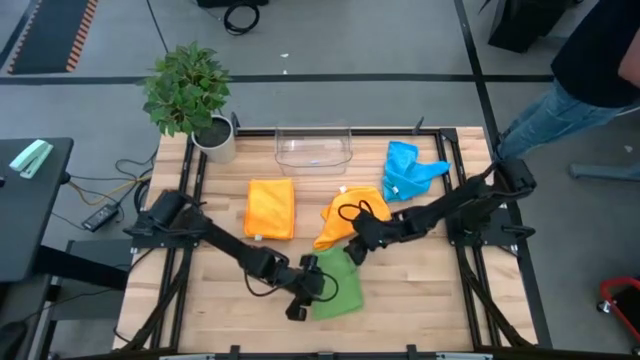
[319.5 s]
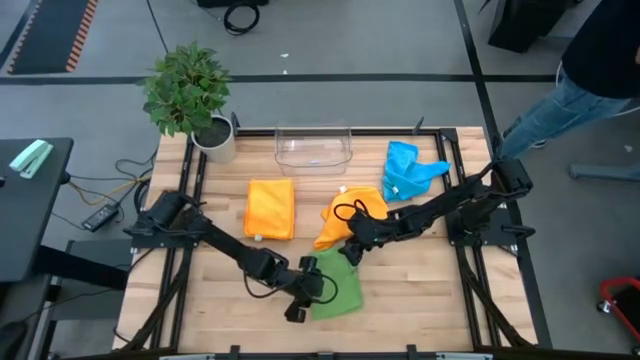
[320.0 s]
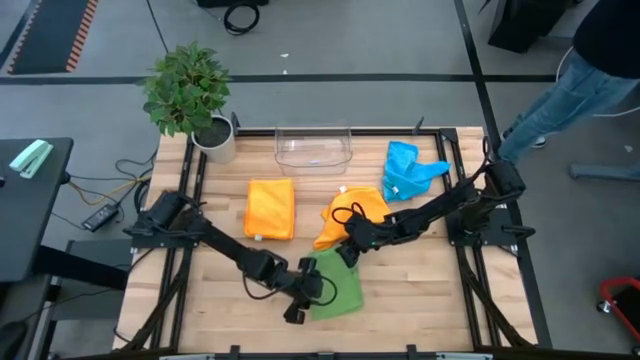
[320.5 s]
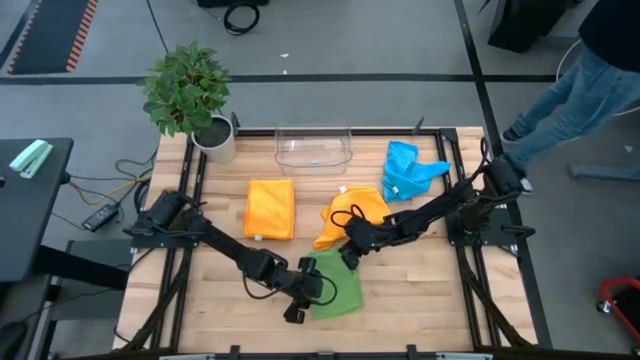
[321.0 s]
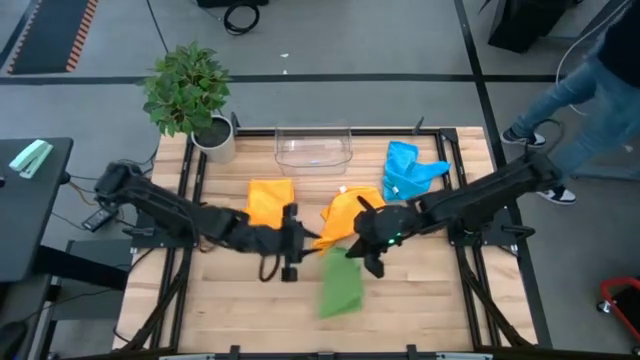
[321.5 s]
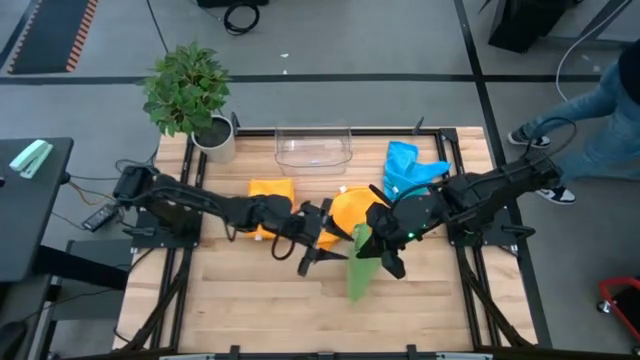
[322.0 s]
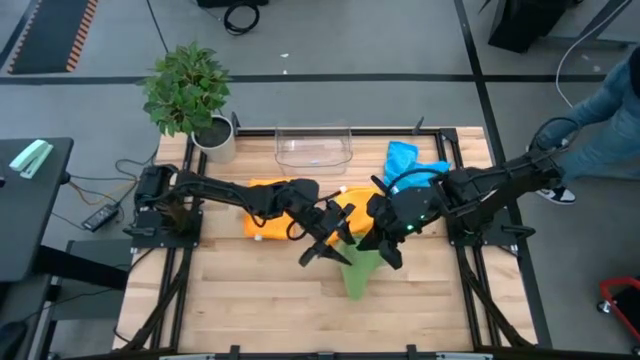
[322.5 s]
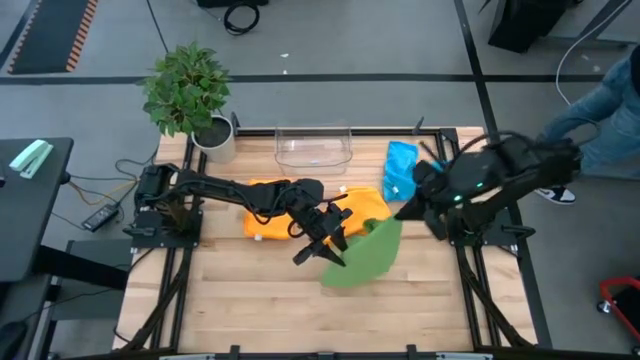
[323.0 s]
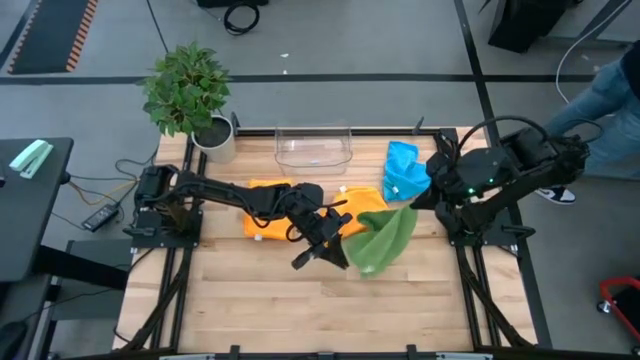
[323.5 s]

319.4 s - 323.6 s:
Task: Fold microfiber towels
Fold the green microfiber cloth

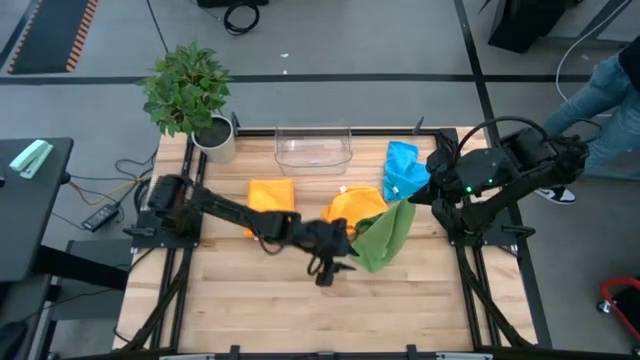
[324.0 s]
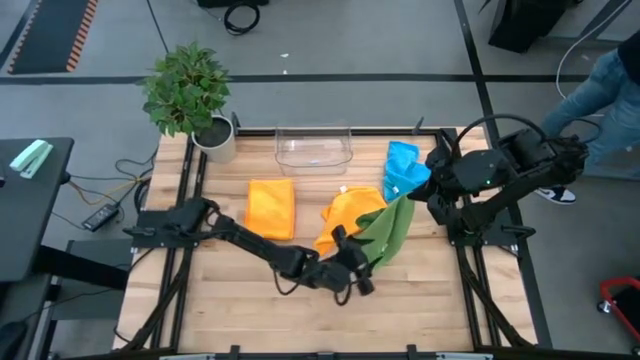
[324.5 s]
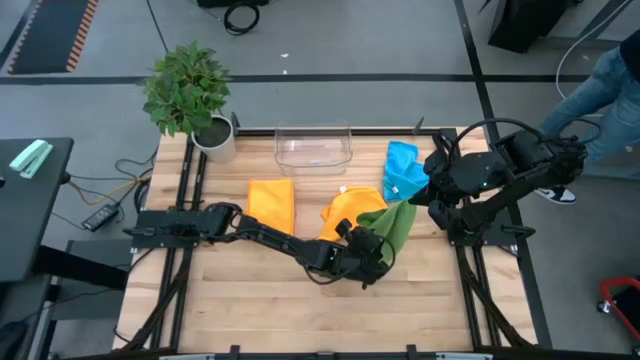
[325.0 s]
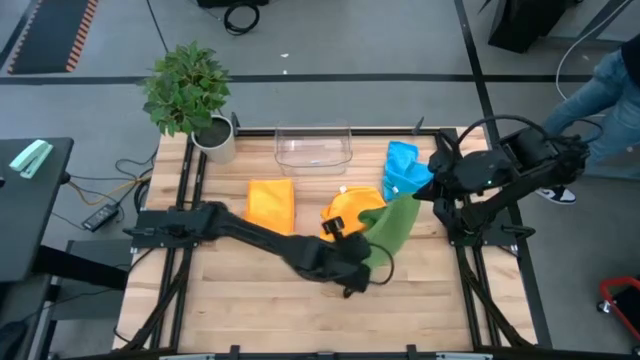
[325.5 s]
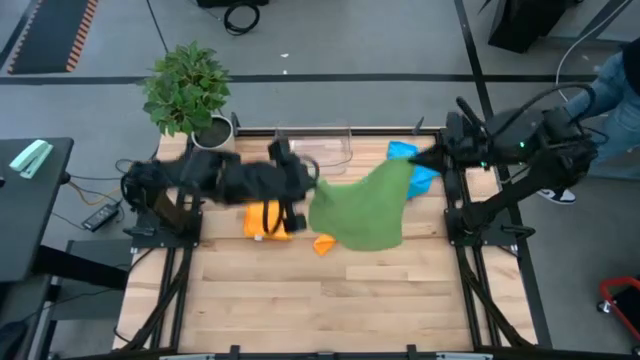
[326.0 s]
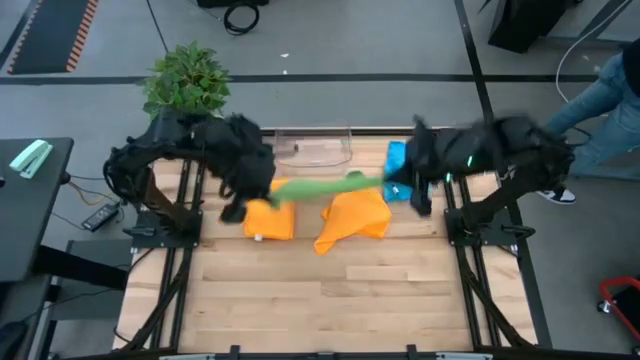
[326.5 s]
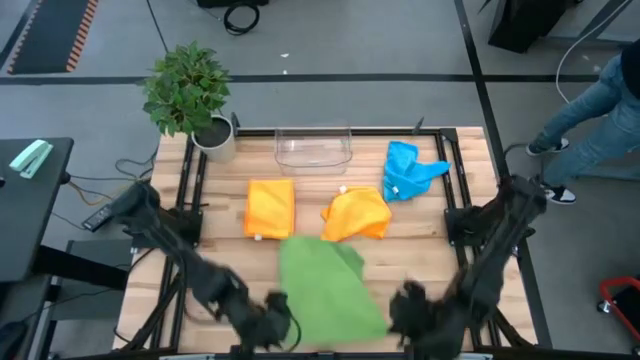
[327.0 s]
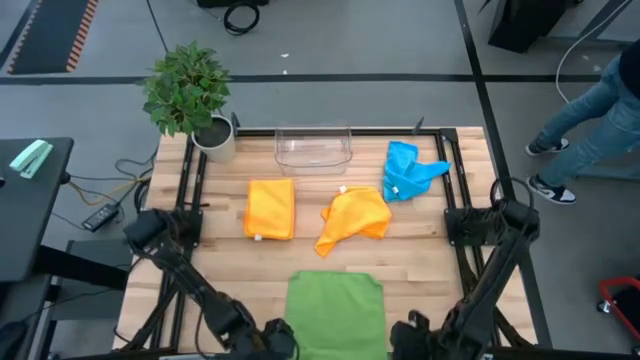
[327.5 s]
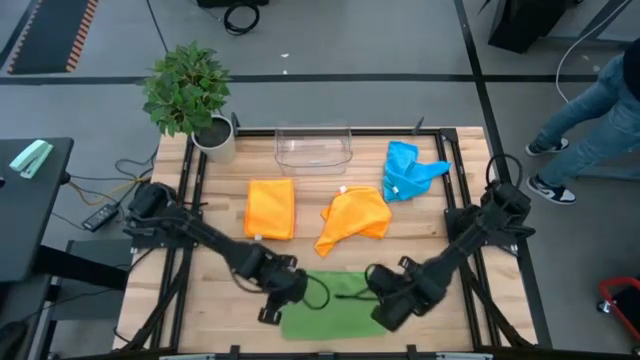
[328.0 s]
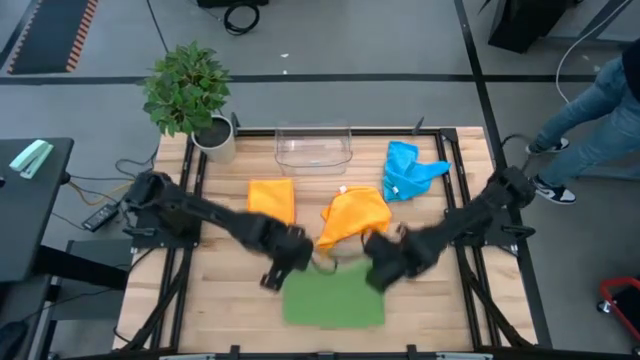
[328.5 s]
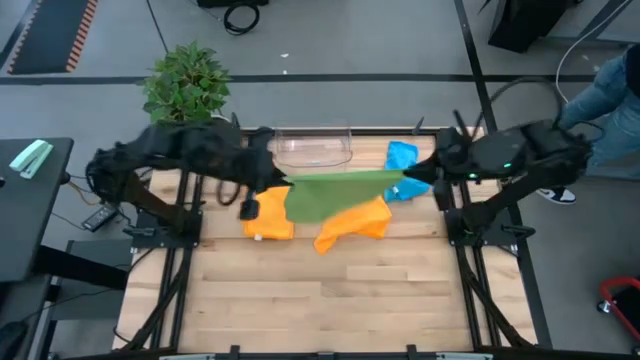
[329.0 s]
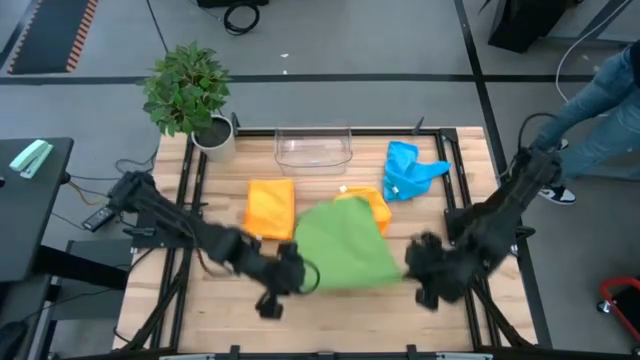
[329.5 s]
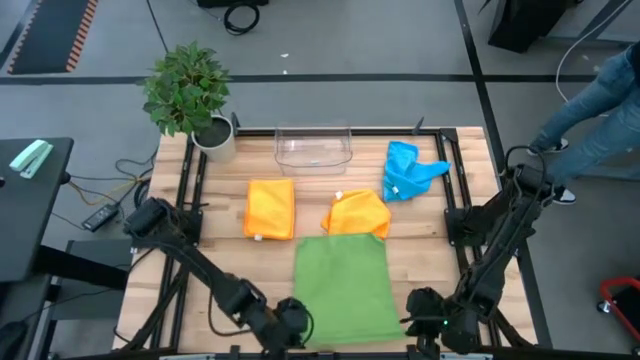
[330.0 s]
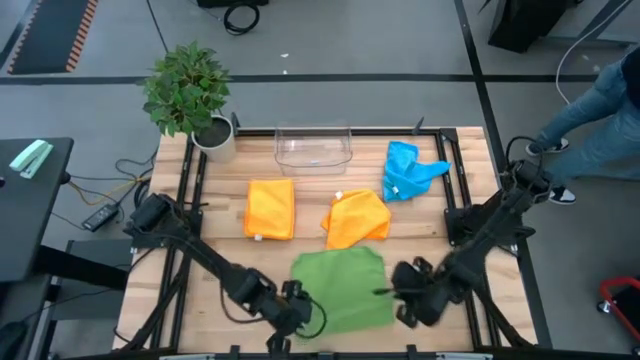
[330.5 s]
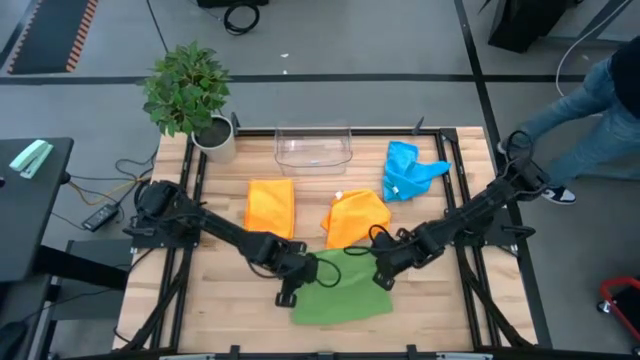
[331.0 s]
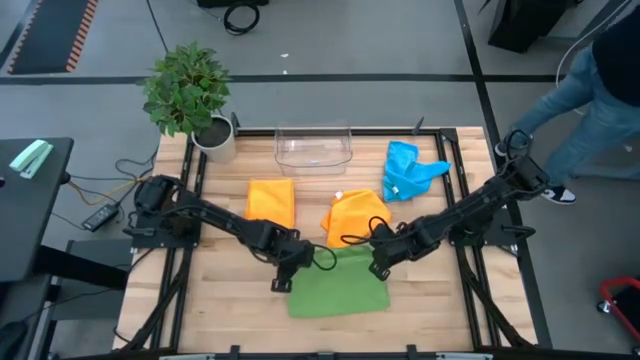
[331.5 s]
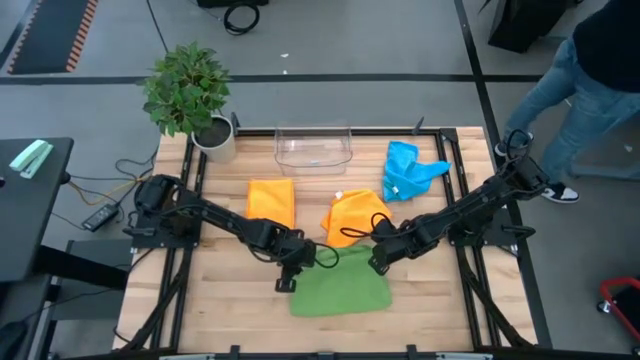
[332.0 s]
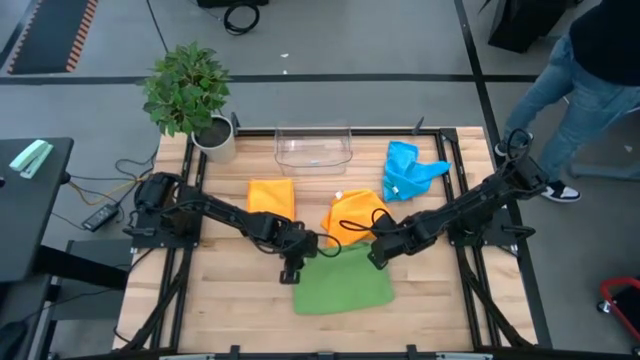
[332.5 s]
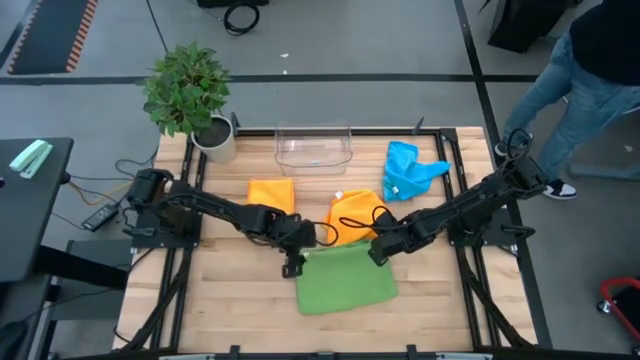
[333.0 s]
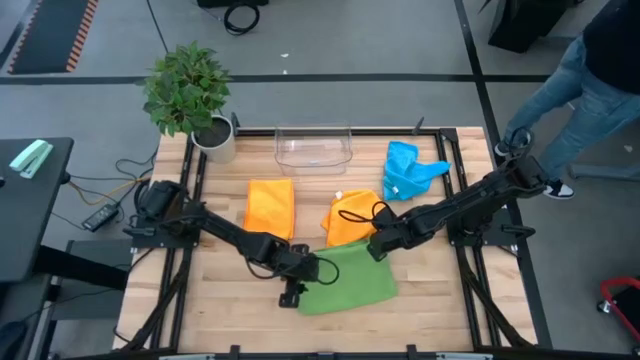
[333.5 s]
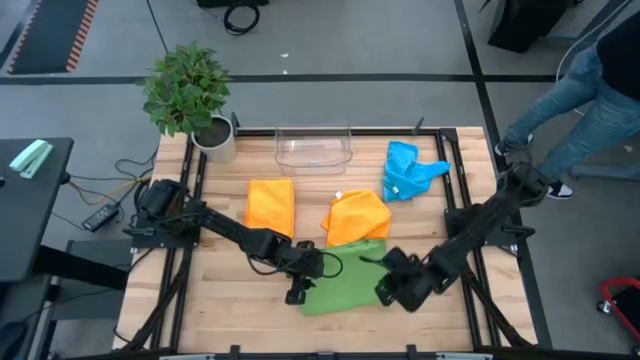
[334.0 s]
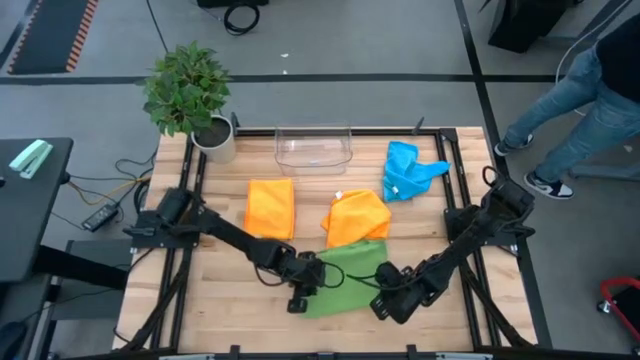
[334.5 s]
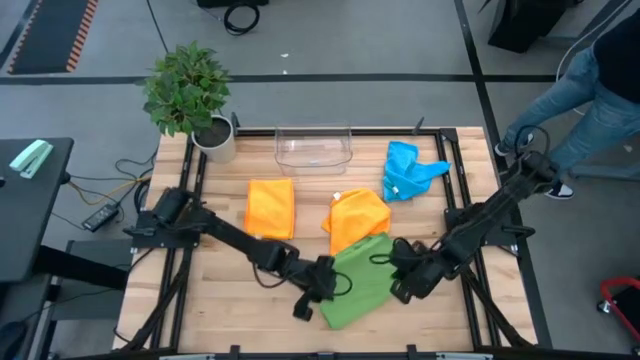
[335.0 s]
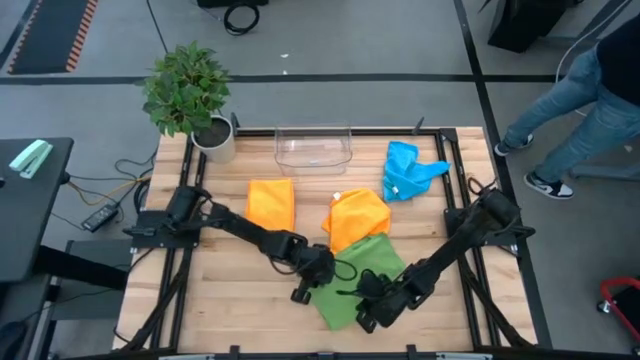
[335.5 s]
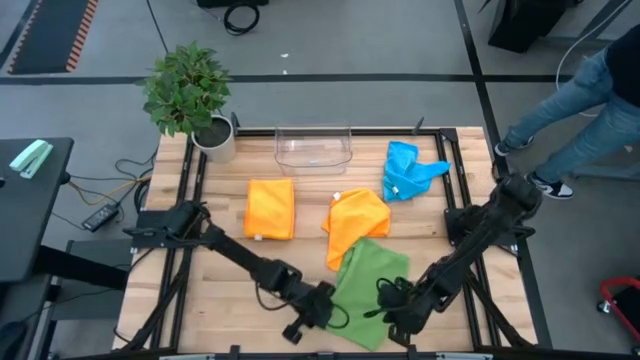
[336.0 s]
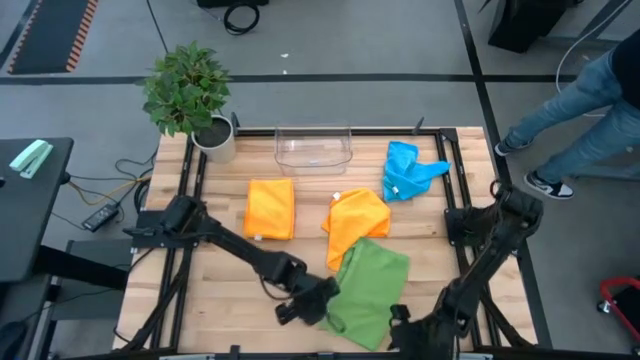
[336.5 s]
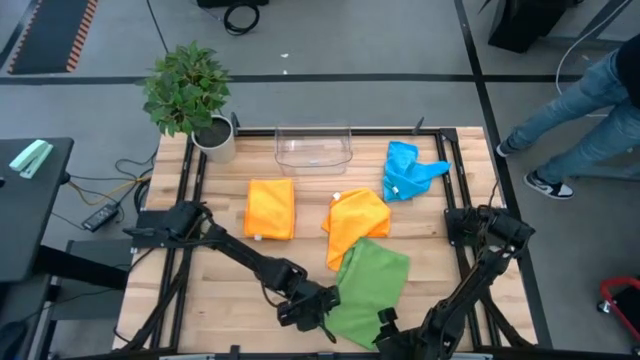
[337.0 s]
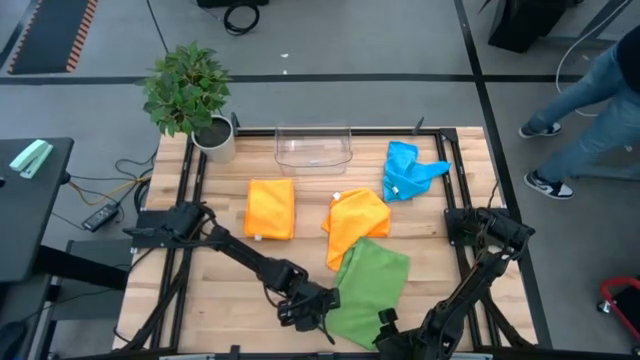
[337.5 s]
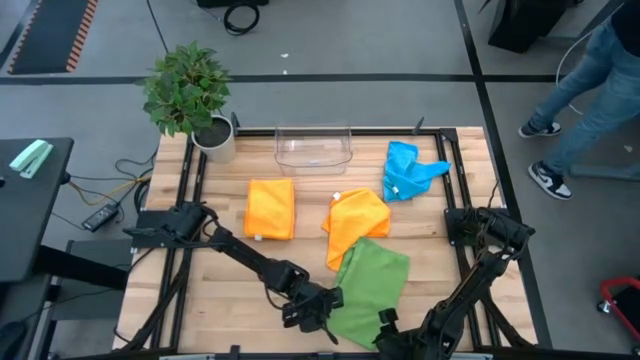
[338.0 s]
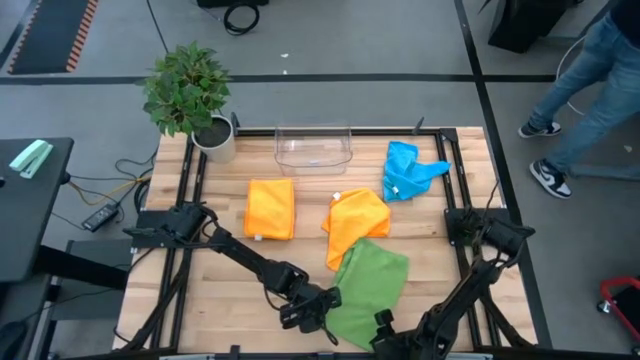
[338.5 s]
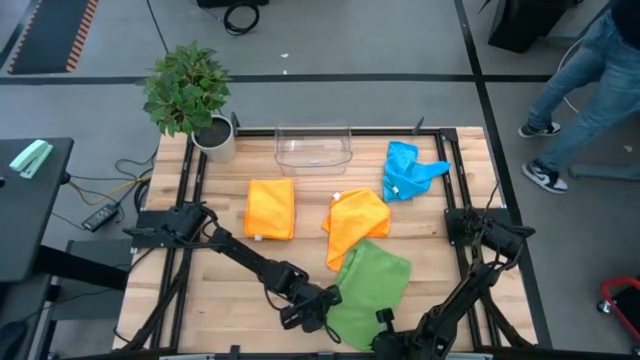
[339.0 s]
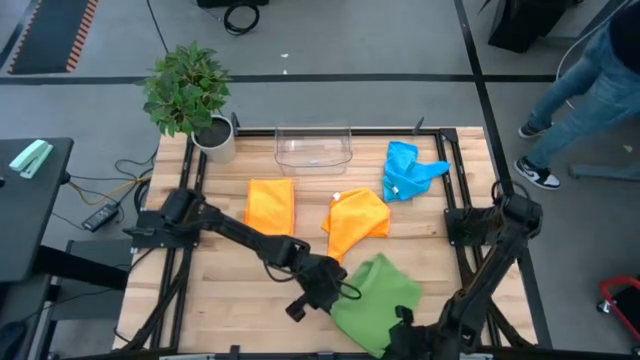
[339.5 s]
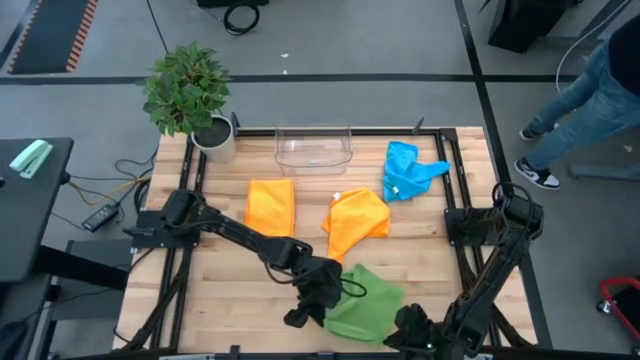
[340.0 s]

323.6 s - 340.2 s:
Fold the green microfiber cloth
